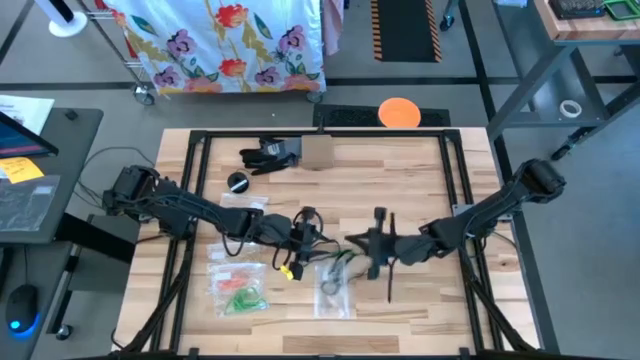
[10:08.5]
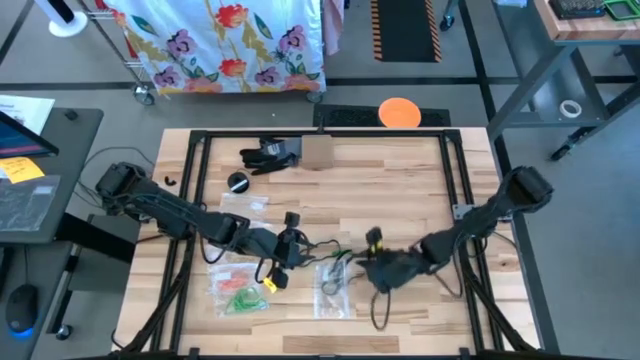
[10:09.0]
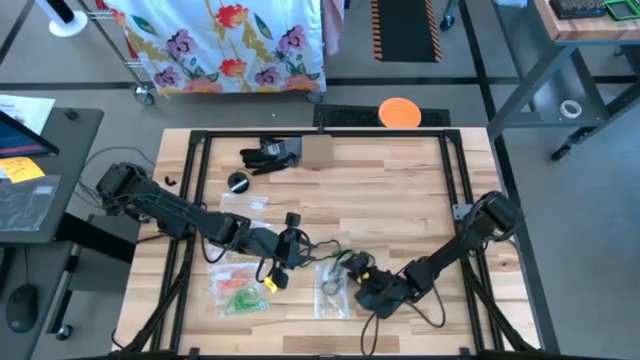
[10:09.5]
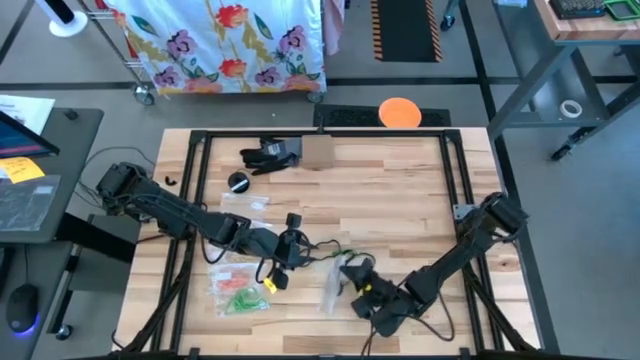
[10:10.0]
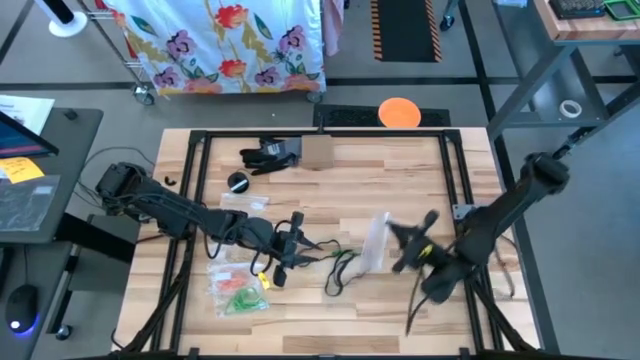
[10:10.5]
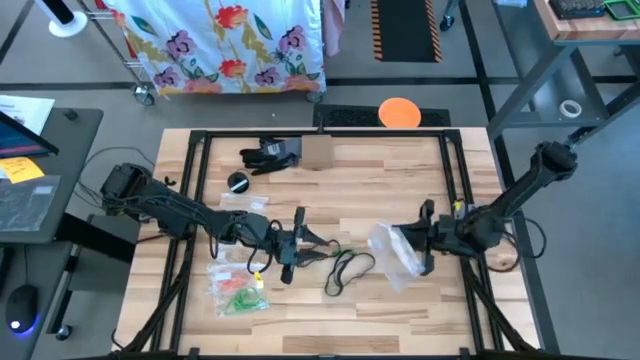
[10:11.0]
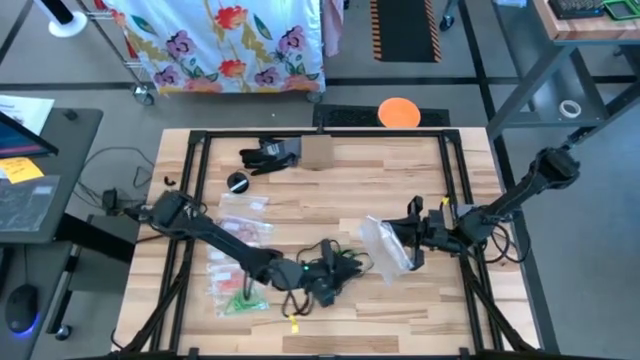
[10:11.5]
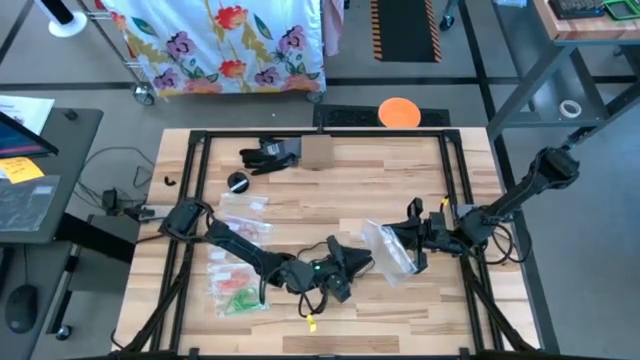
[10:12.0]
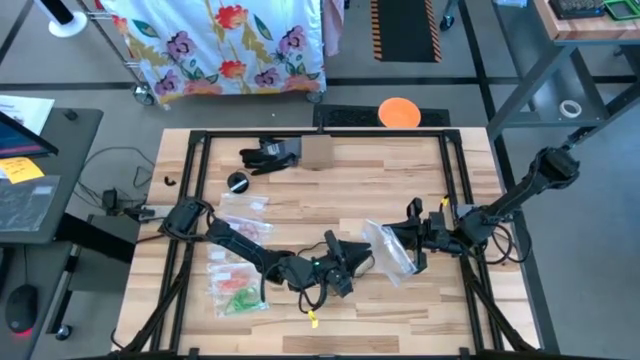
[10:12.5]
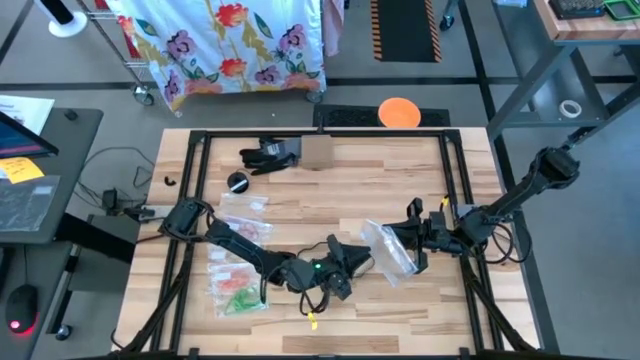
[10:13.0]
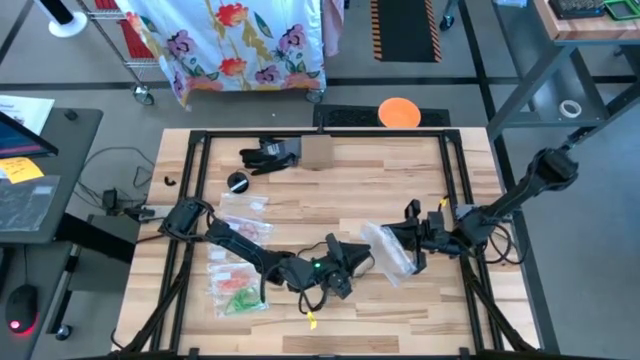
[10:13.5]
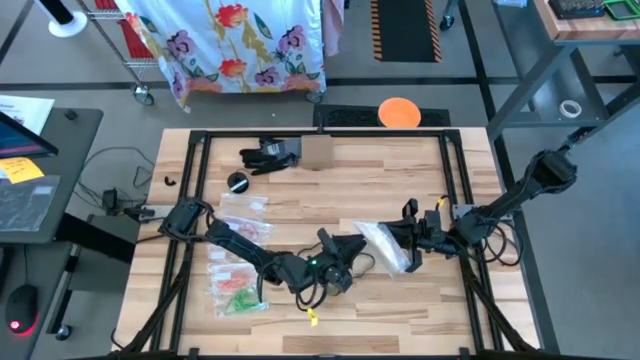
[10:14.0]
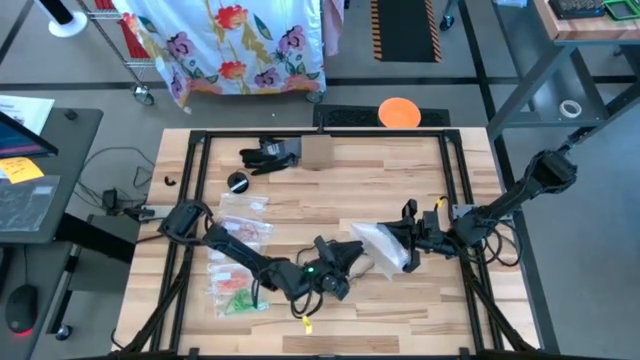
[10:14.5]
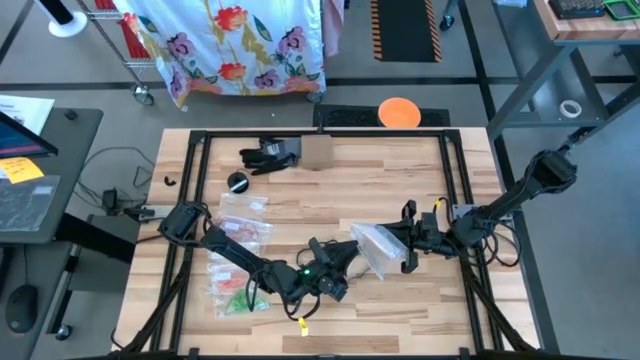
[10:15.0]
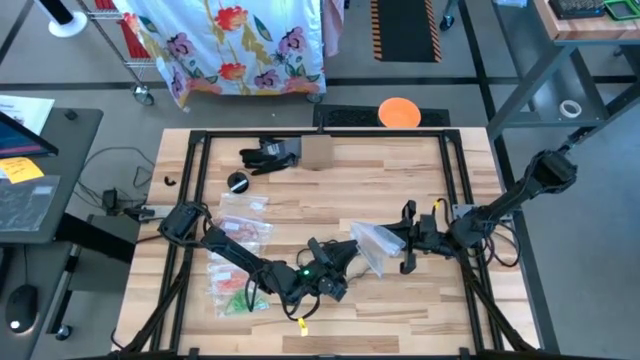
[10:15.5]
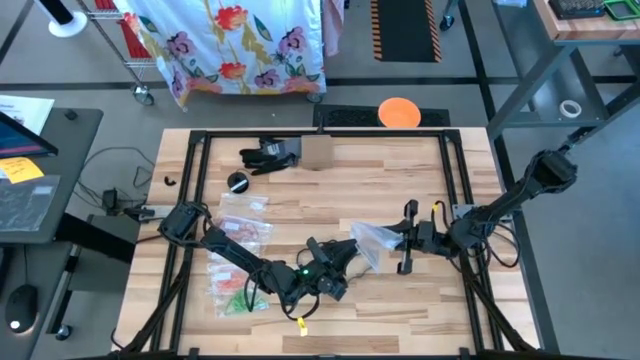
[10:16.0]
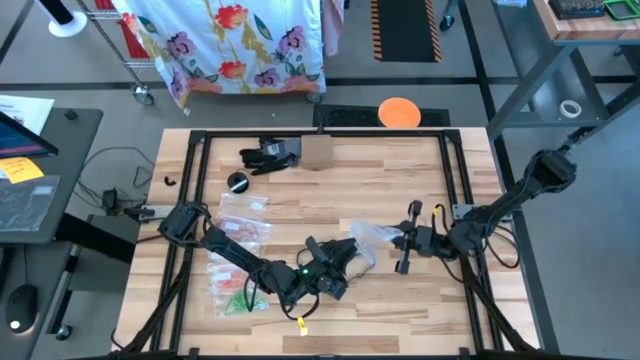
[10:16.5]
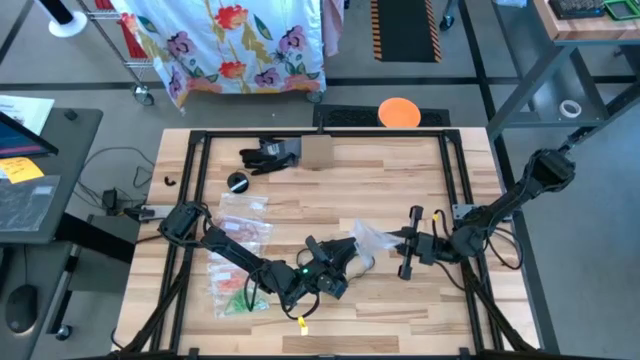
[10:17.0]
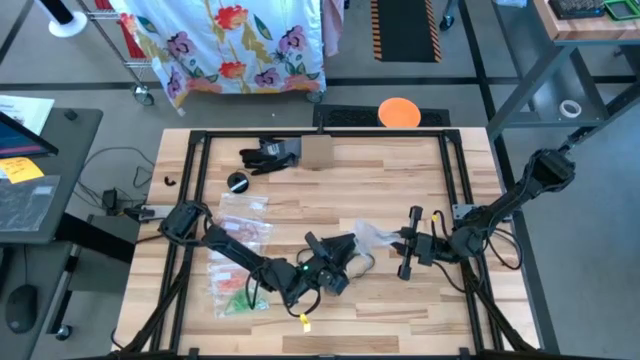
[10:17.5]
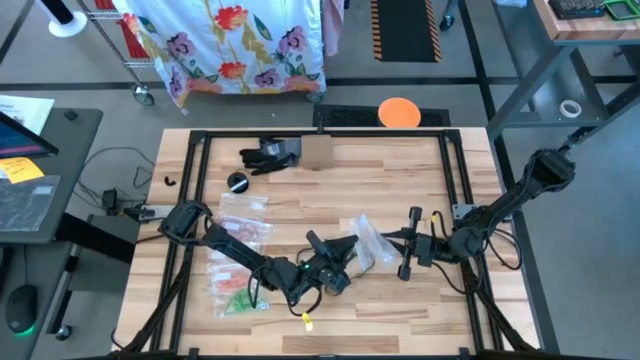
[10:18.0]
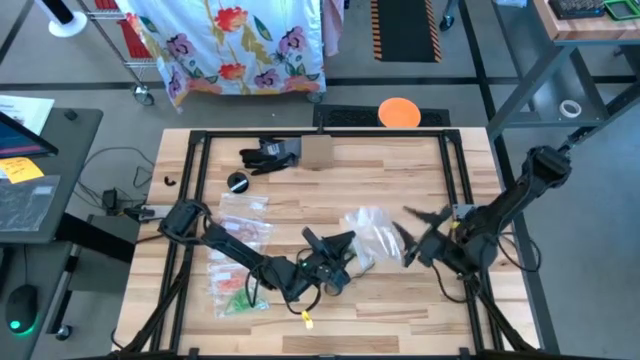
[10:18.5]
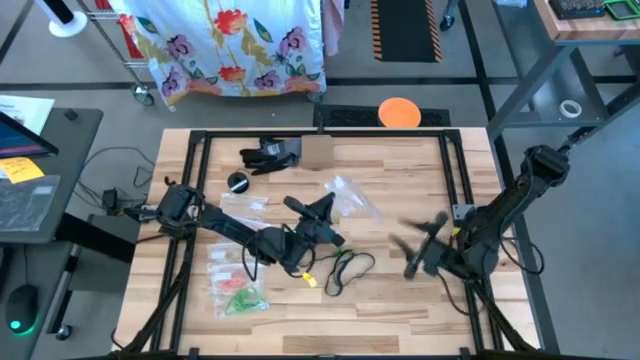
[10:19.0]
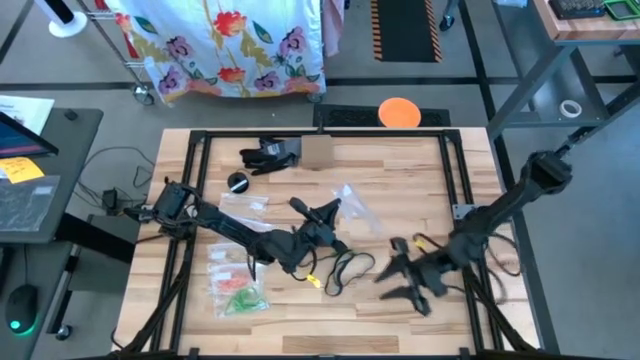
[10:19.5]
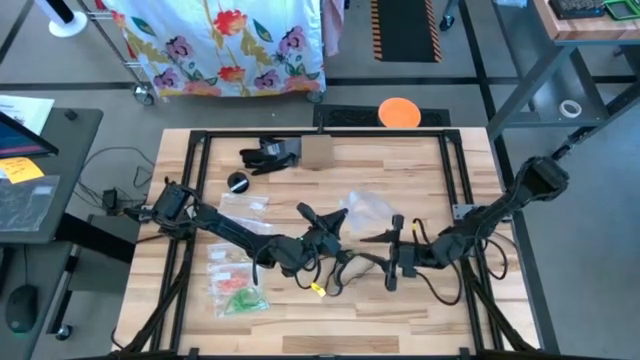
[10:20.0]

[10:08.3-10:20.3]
Task: Sort rubber bands
Open the transparent zip bag

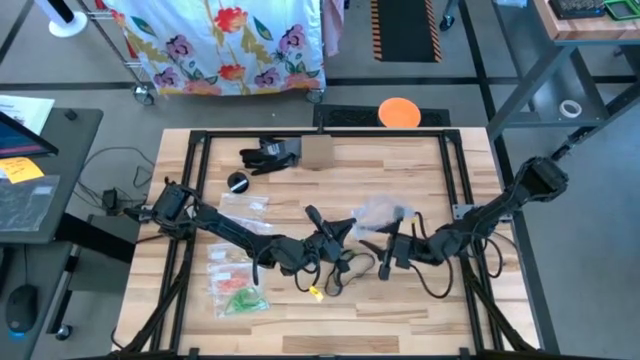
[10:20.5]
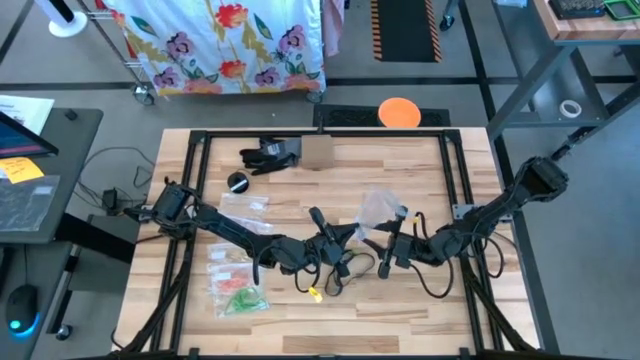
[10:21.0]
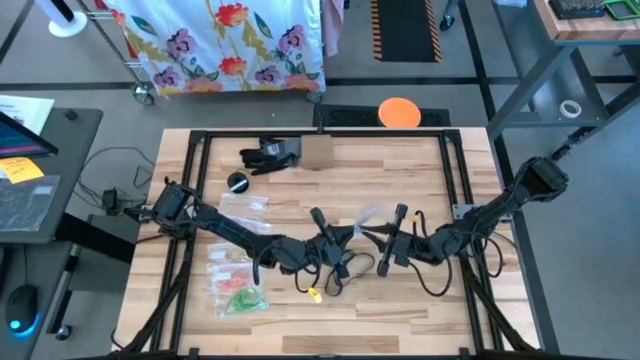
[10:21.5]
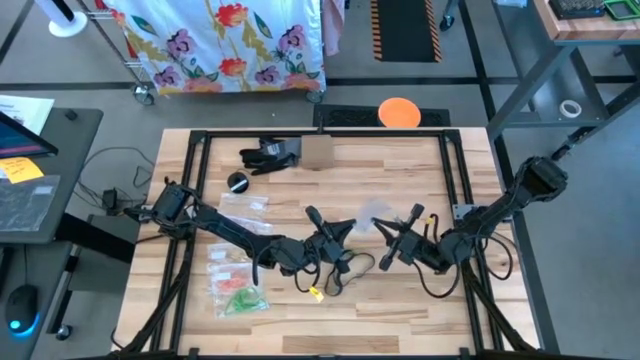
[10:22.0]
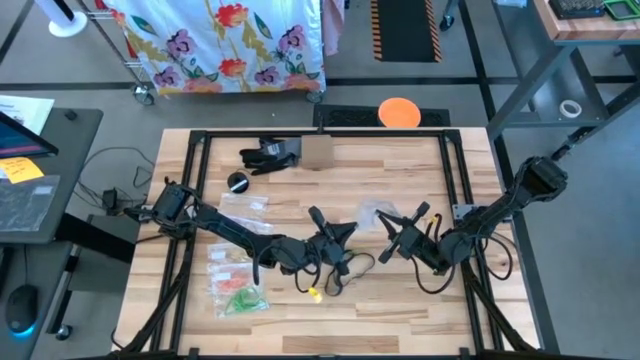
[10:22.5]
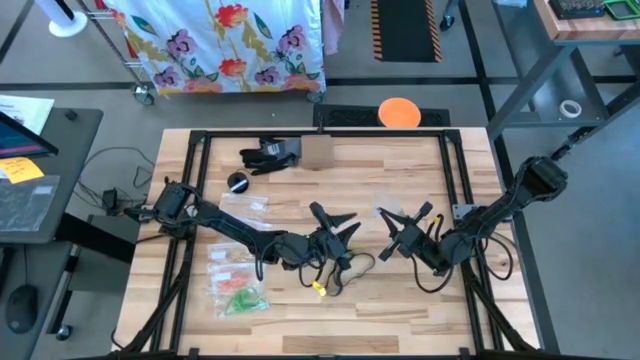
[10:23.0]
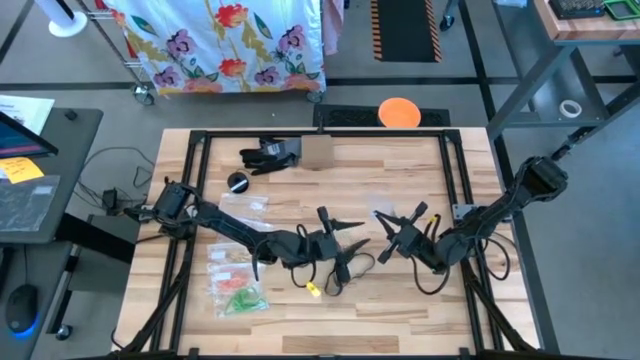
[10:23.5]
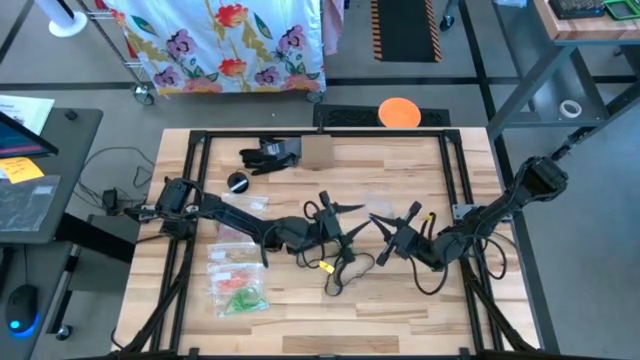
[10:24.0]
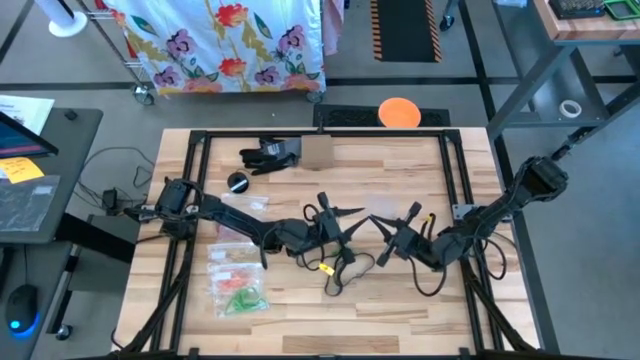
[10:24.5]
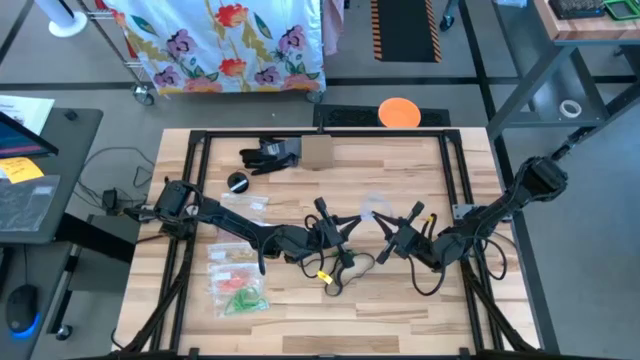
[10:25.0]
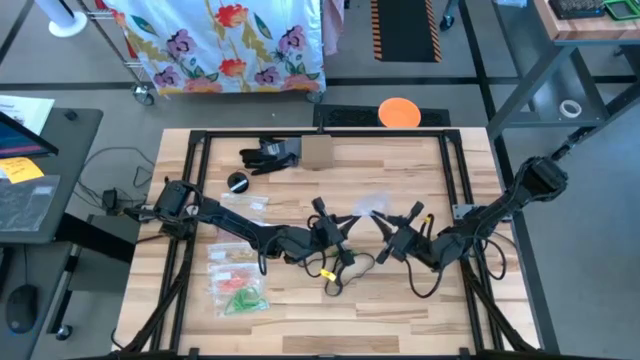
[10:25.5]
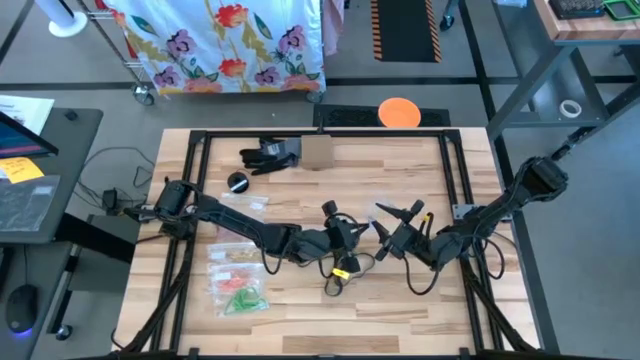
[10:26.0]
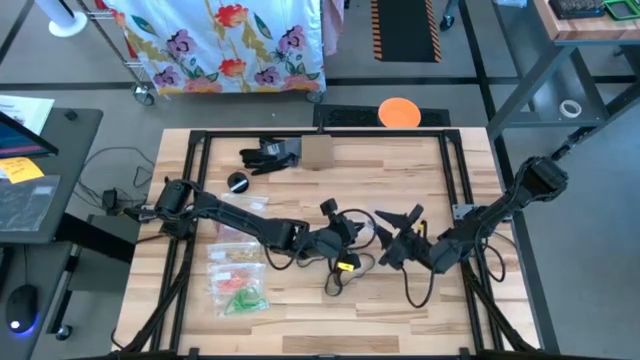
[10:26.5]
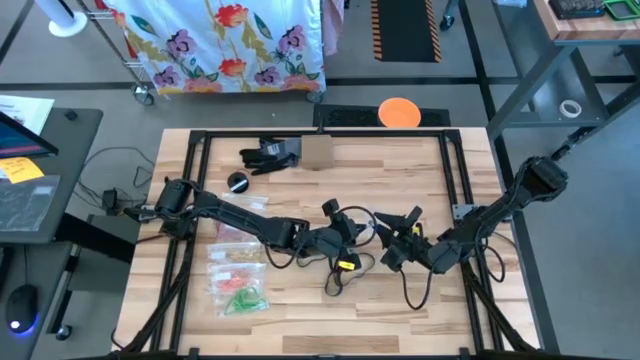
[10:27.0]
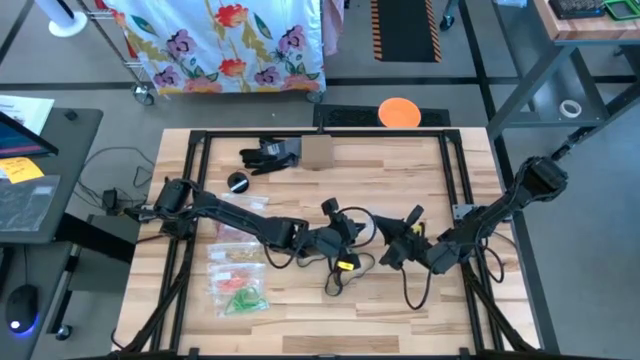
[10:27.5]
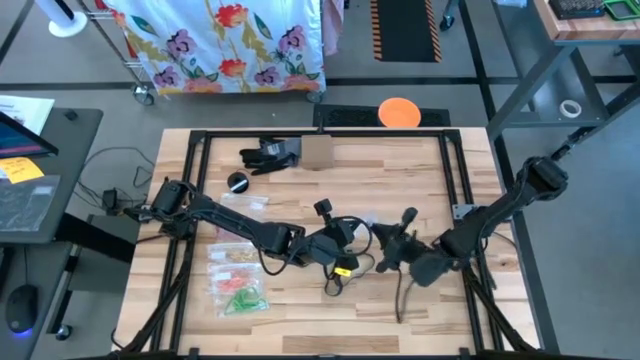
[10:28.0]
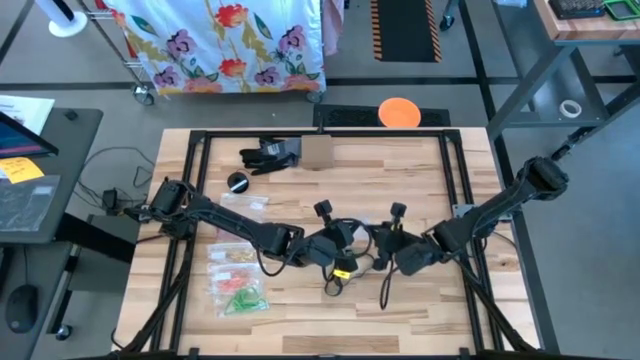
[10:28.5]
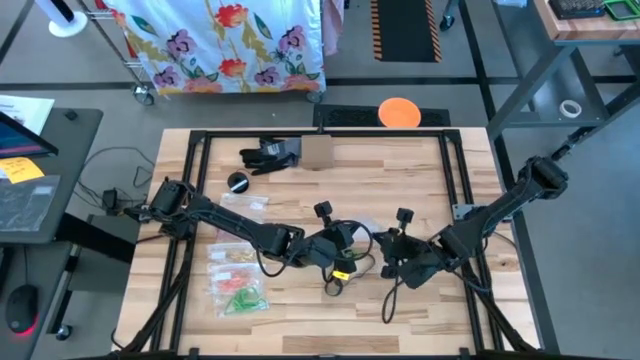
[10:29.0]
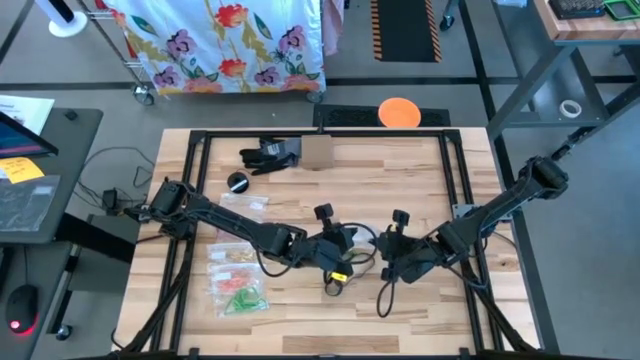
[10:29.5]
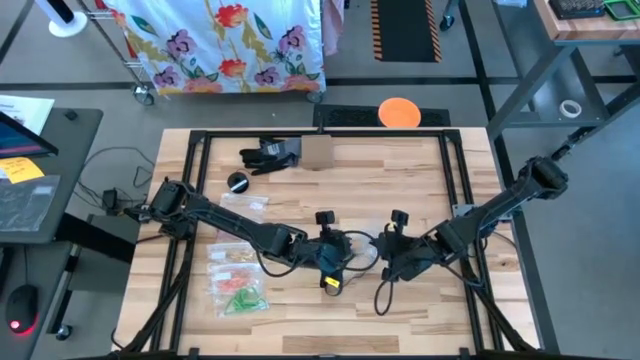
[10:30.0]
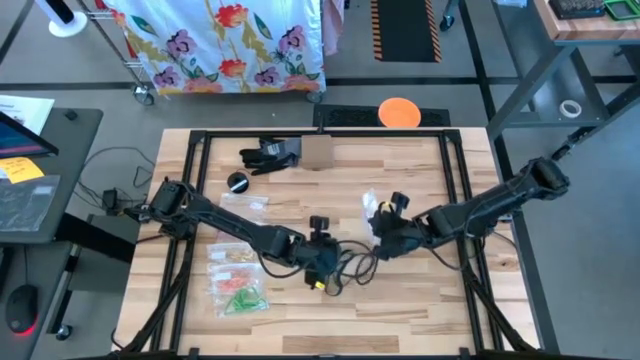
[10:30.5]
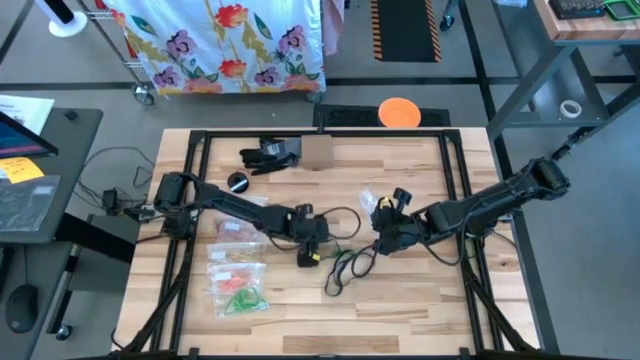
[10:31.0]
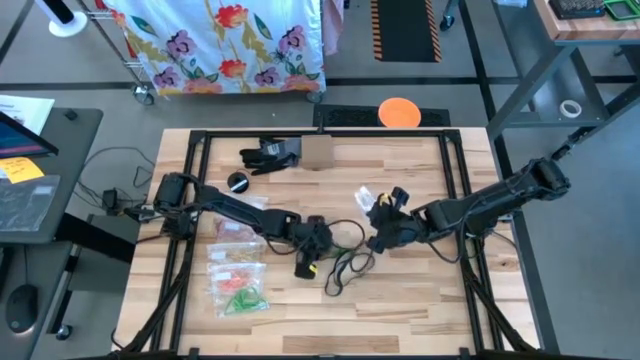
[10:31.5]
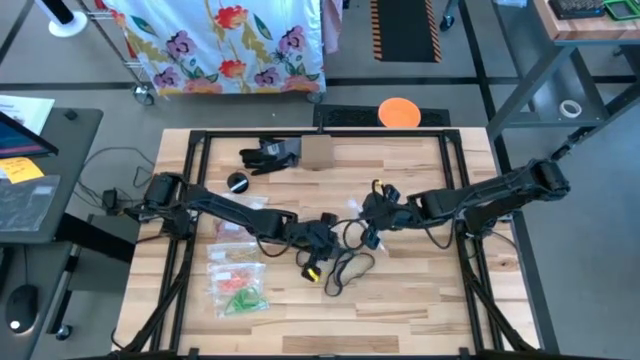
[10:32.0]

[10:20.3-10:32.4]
Open the transparent zip bag
